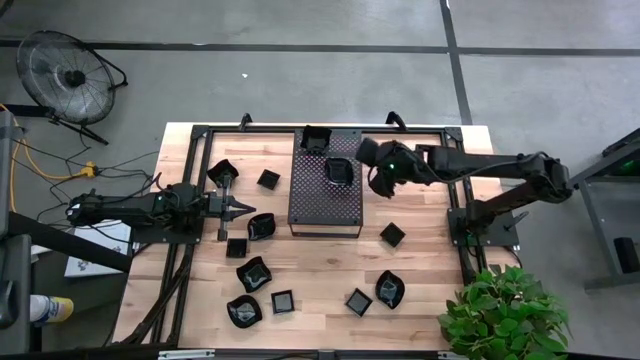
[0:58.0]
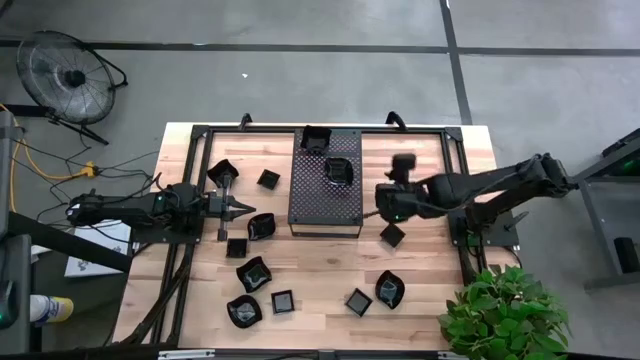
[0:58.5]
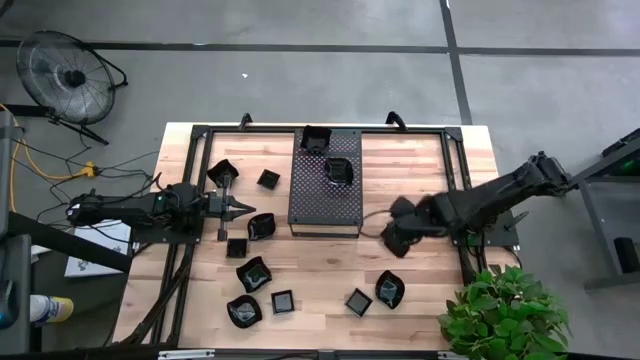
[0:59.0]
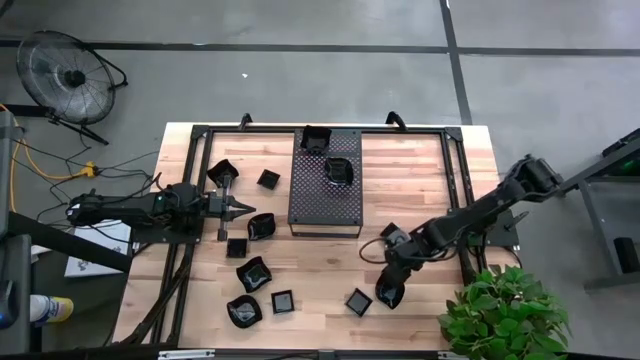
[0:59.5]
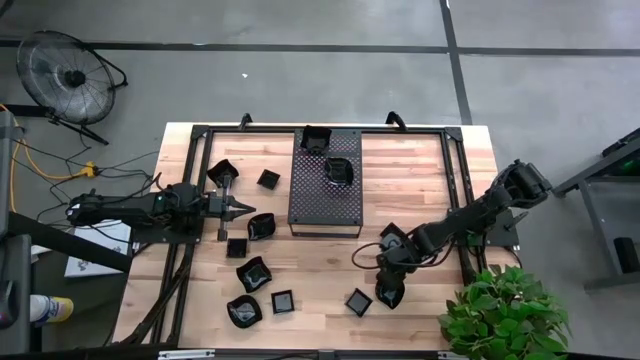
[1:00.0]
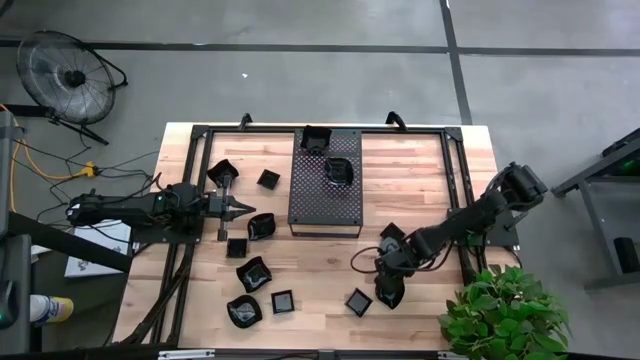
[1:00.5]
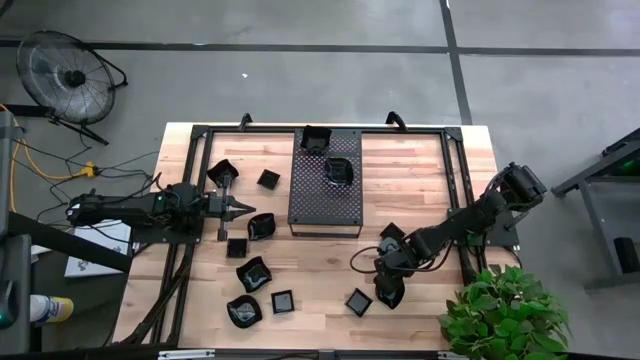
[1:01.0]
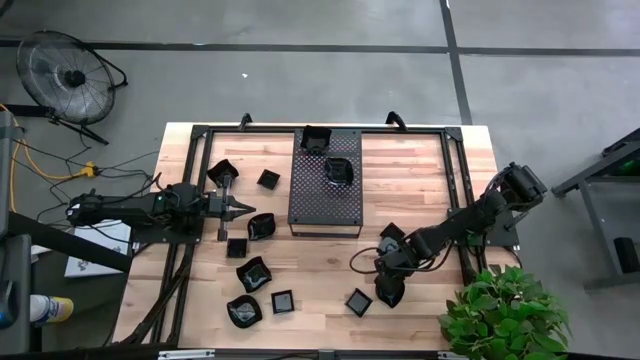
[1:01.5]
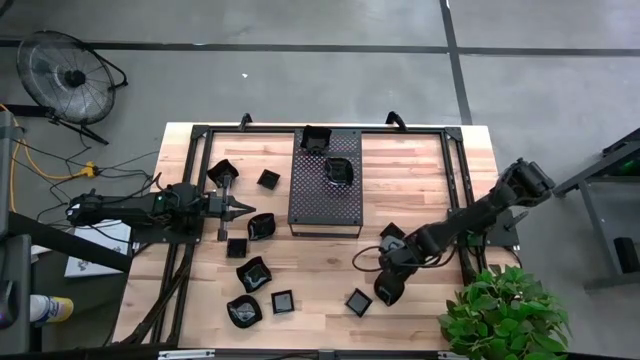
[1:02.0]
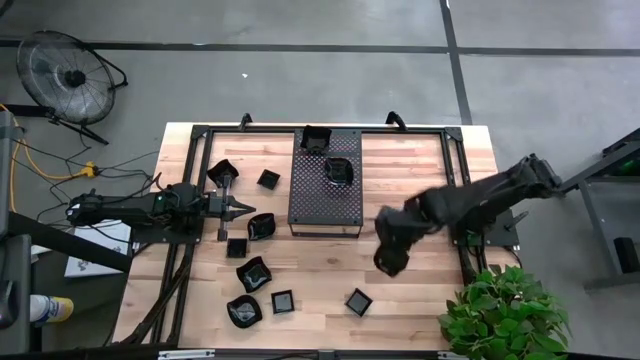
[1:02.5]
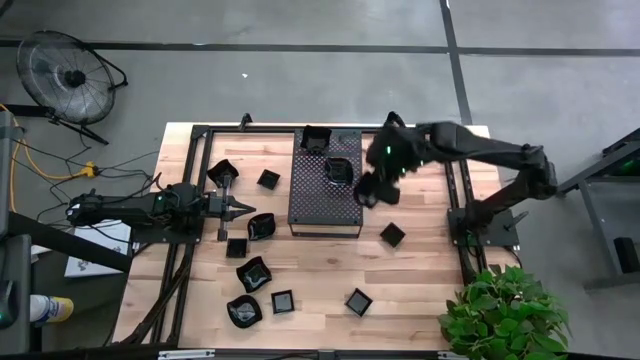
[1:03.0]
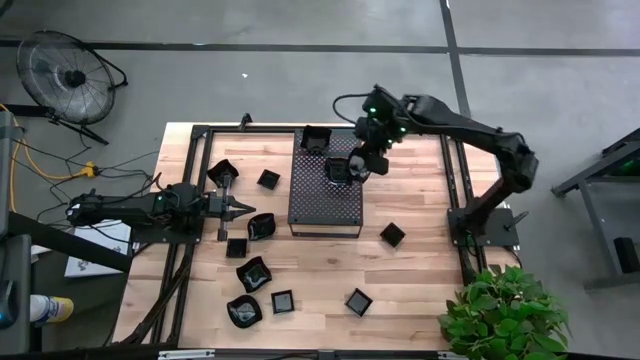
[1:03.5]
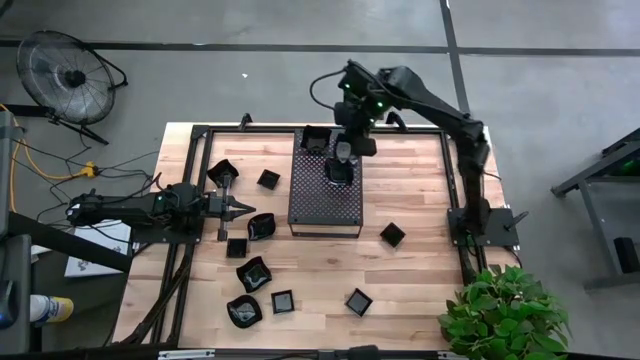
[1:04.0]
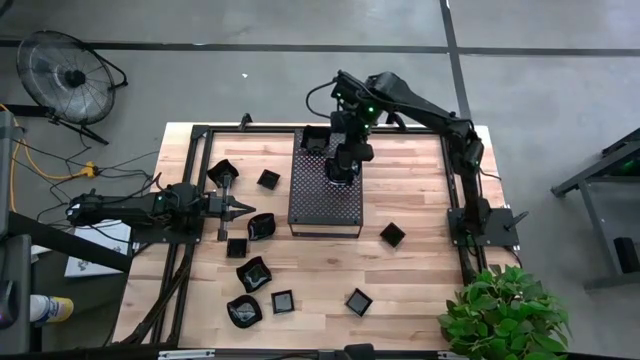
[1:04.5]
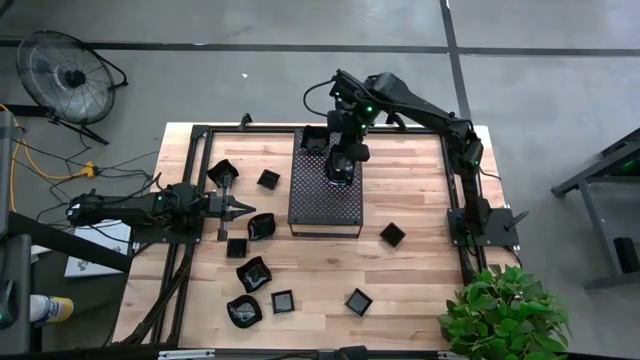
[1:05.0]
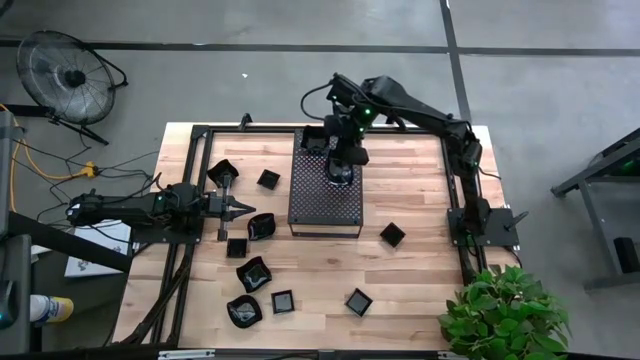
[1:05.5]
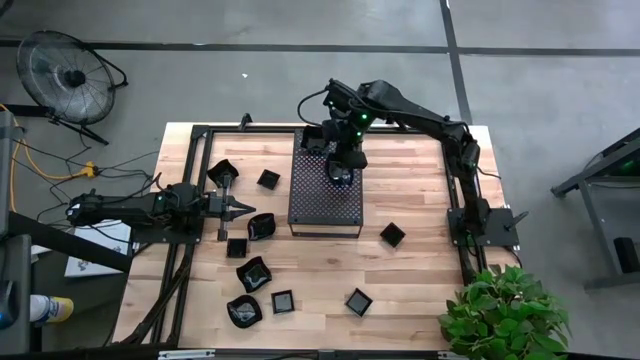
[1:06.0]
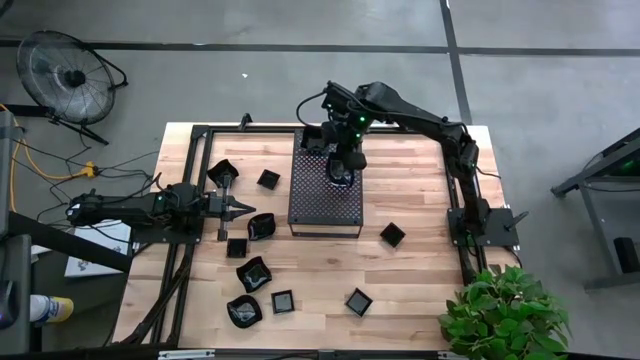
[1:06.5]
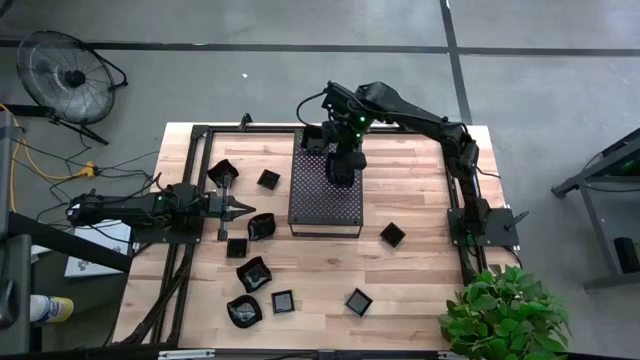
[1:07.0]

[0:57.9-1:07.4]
Task: Pick & Place Mini shaped plates
Stack the black leaf shape plate on top of the black leaf shaped plate on the shelf

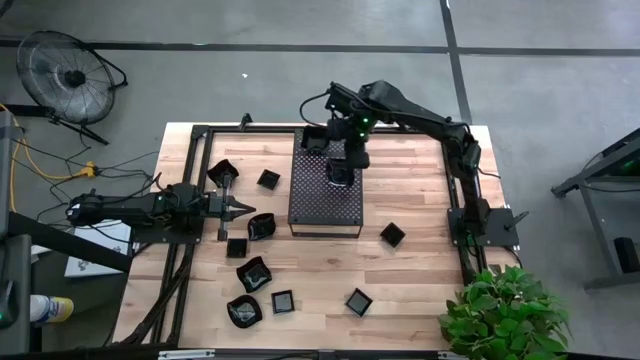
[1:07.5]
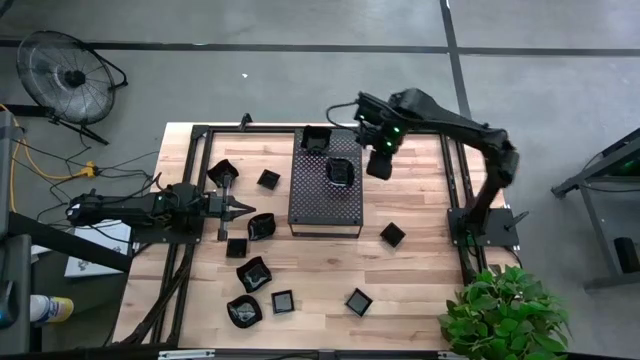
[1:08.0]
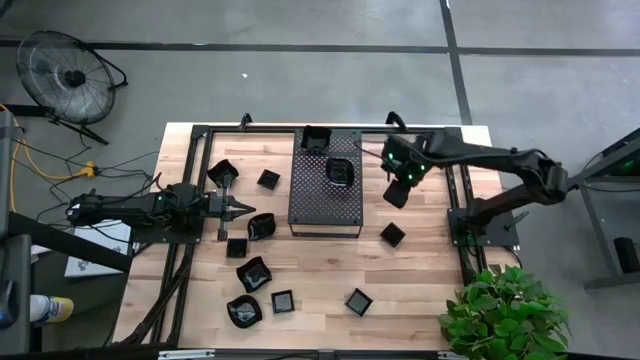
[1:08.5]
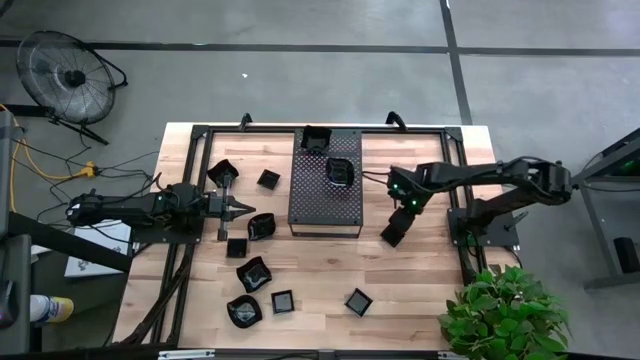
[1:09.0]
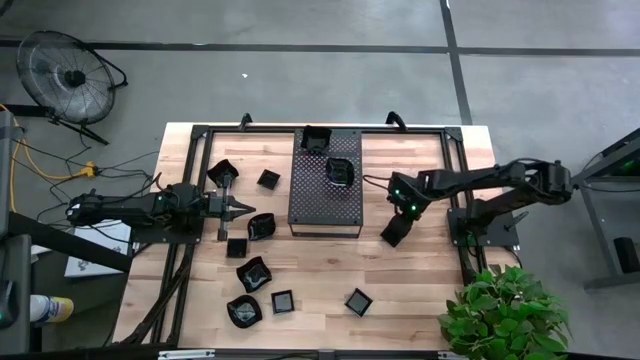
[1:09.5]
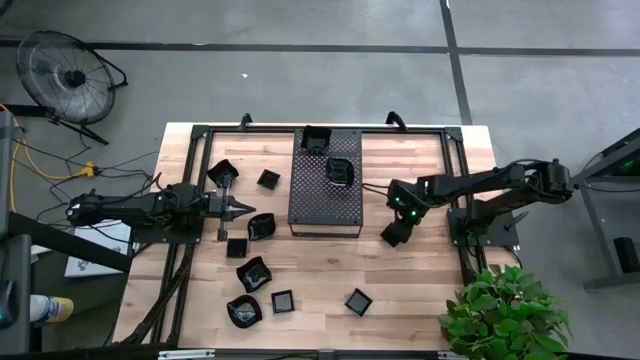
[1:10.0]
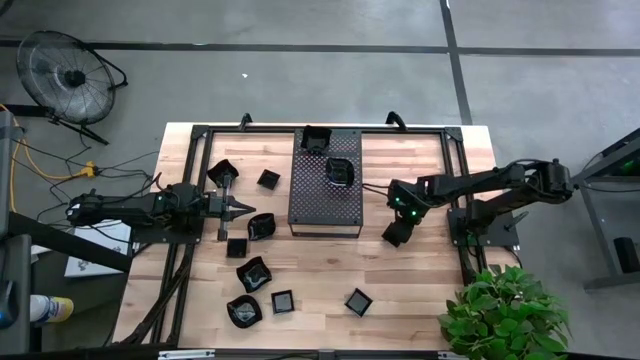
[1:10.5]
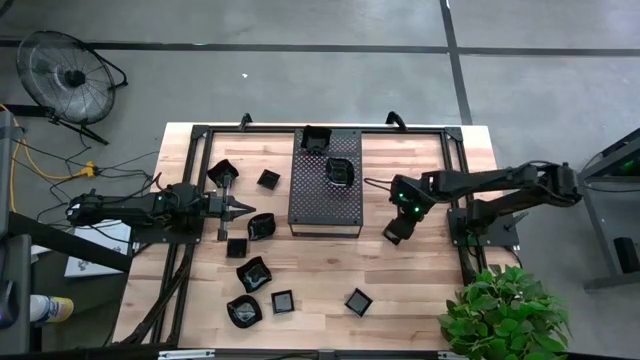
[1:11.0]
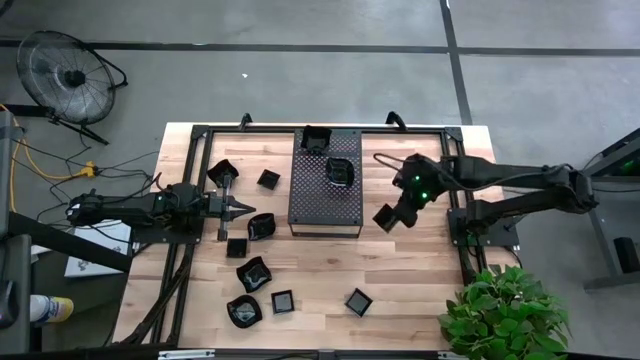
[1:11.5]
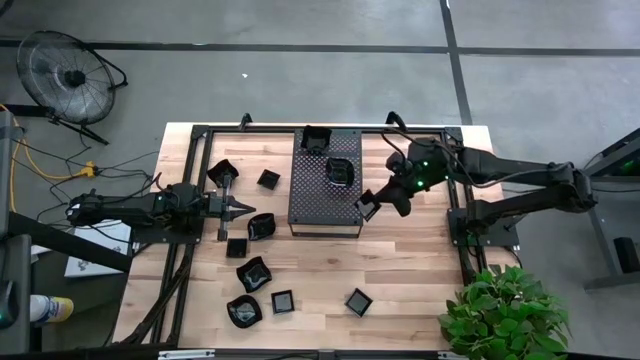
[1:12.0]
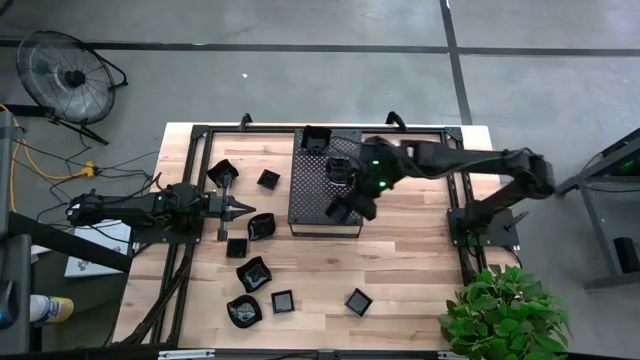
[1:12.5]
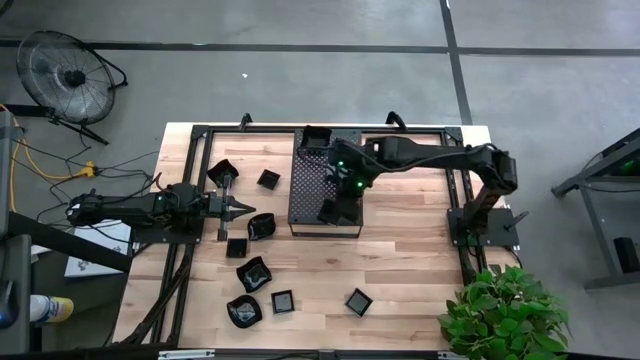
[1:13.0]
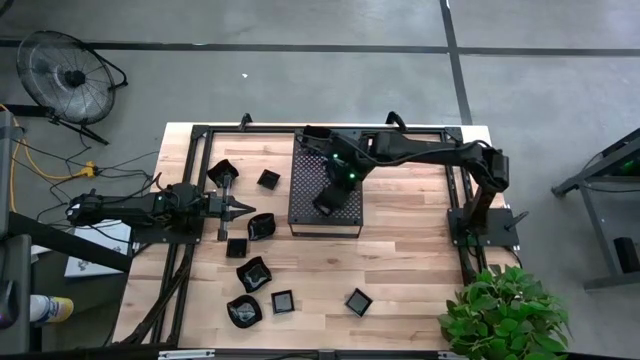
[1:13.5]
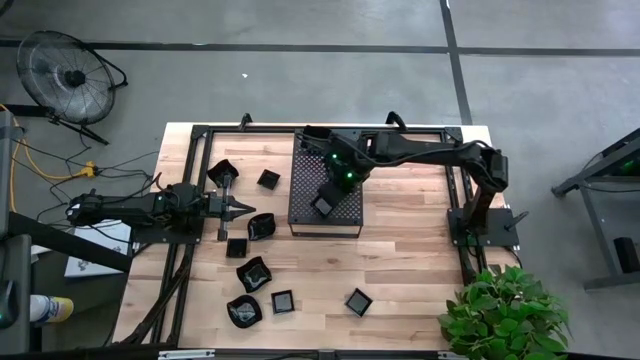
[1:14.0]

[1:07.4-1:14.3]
Put the black square plate on the shelf

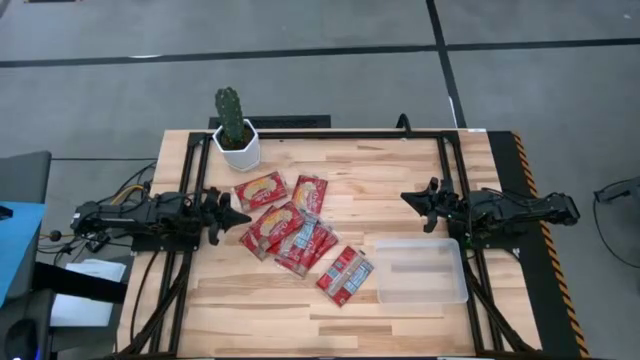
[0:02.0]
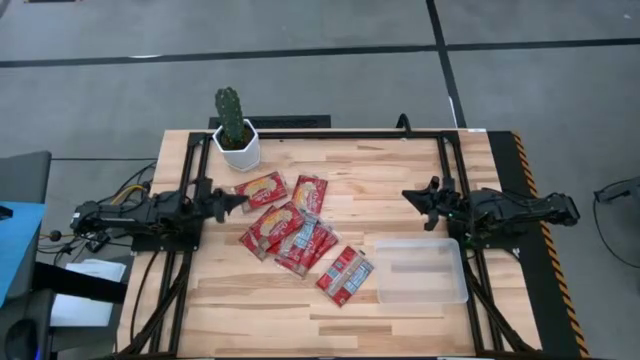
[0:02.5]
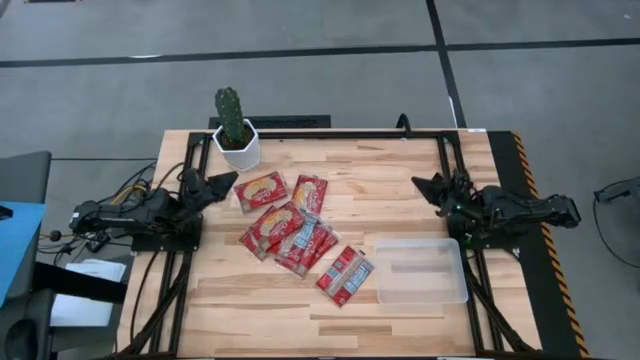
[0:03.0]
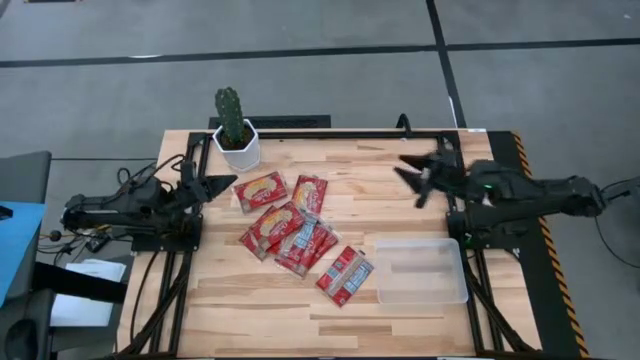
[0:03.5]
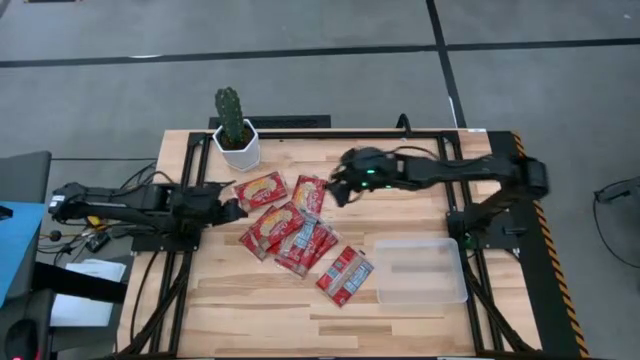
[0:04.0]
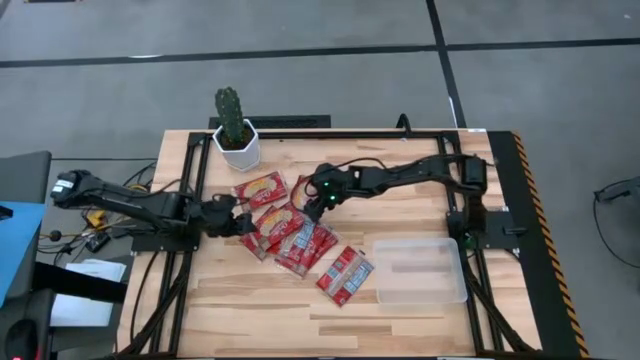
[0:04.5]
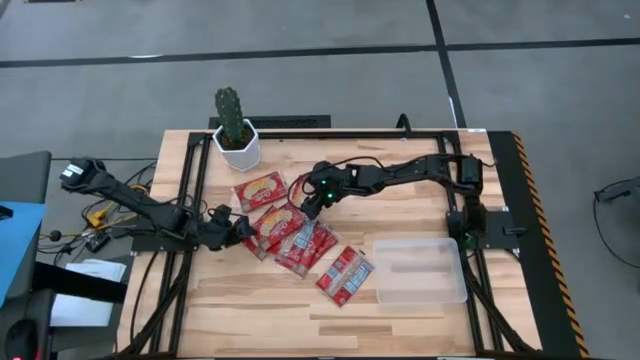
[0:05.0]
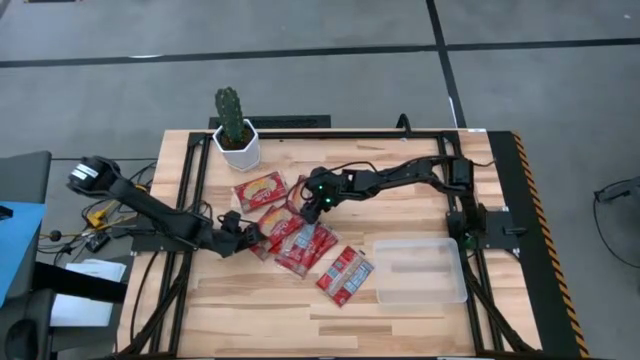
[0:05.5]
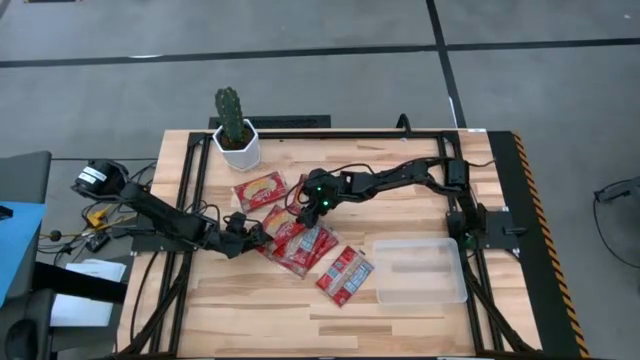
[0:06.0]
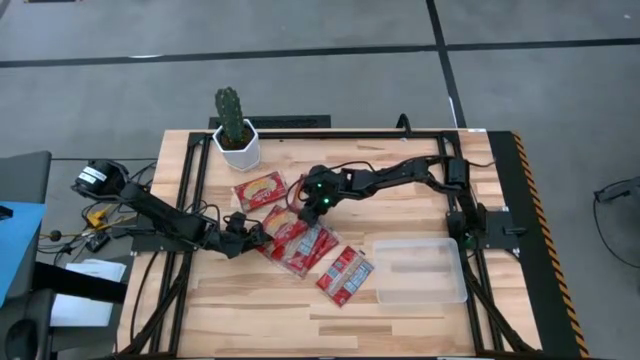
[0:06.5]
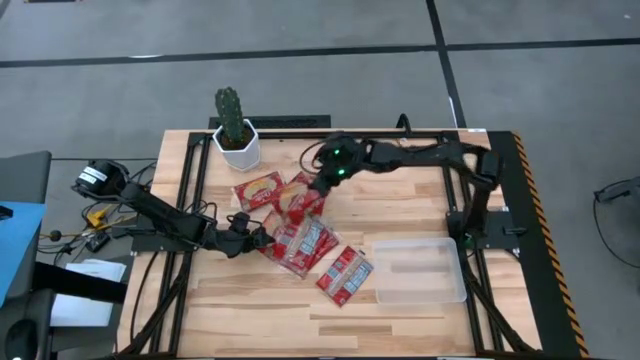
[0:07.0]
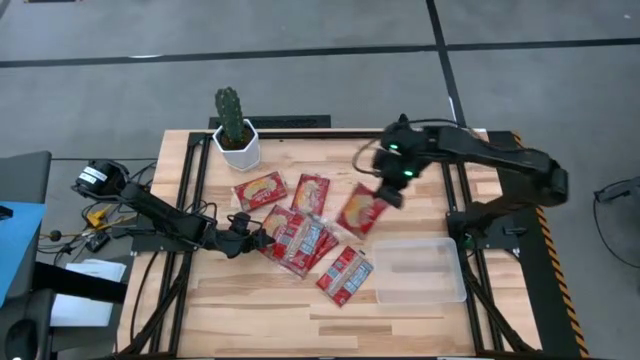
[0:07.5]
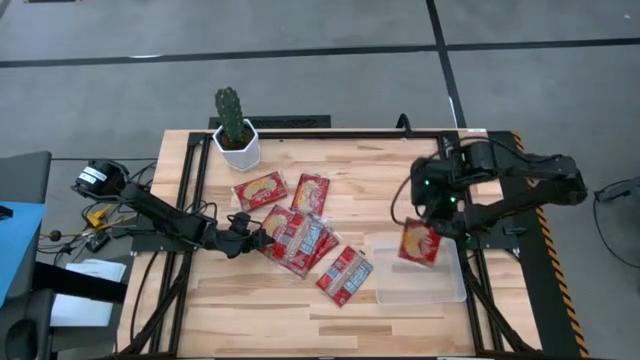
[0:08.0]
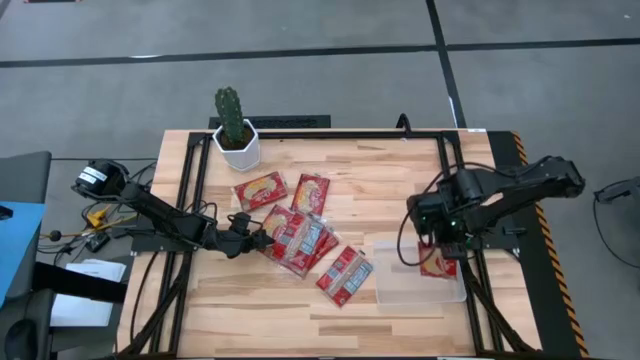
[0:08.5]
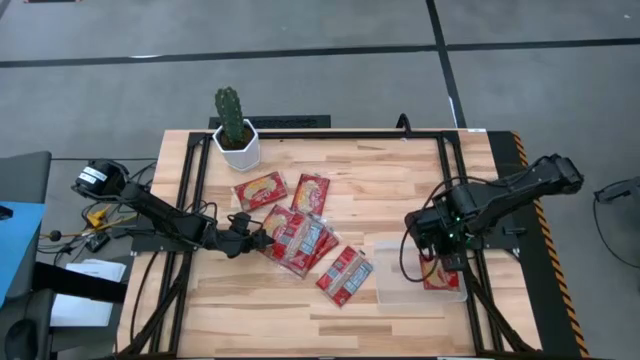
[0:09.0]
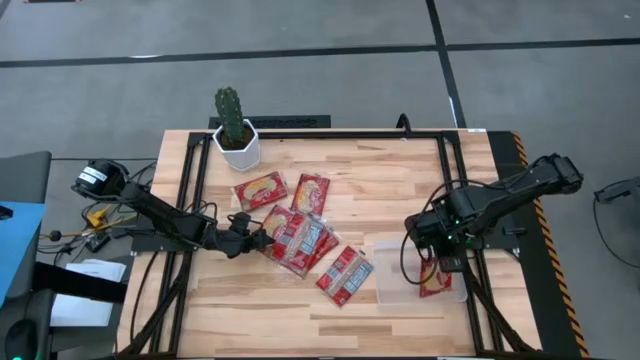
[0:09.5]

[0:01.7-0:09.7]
Task: Sort popcorn bags into baskets
Put the popcorn bag into the transparent bin
